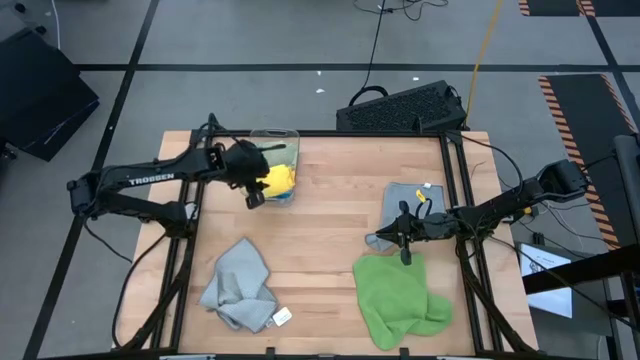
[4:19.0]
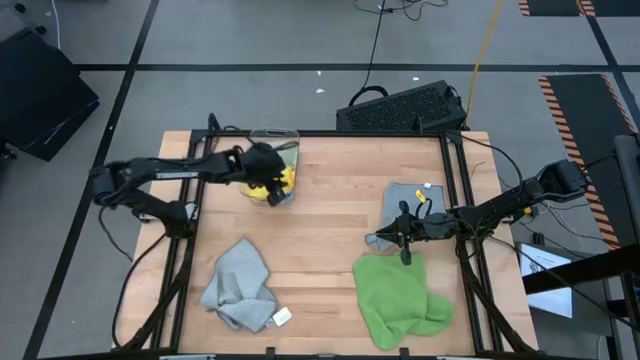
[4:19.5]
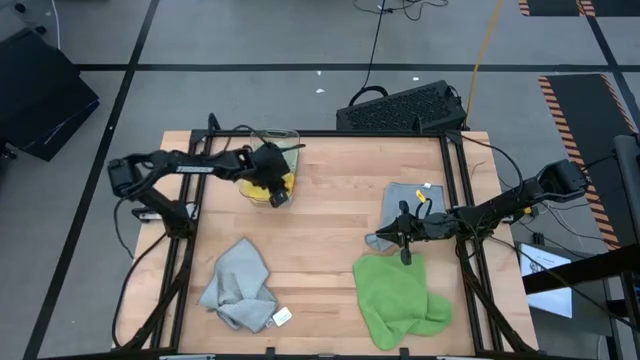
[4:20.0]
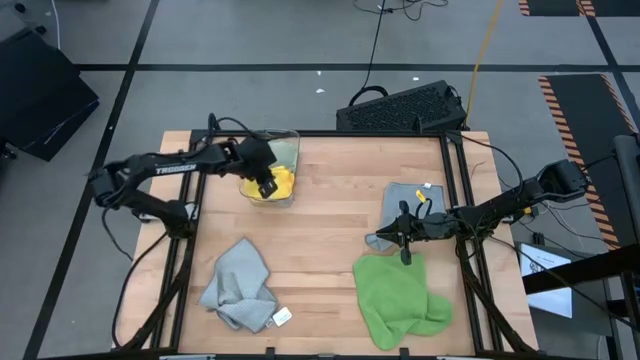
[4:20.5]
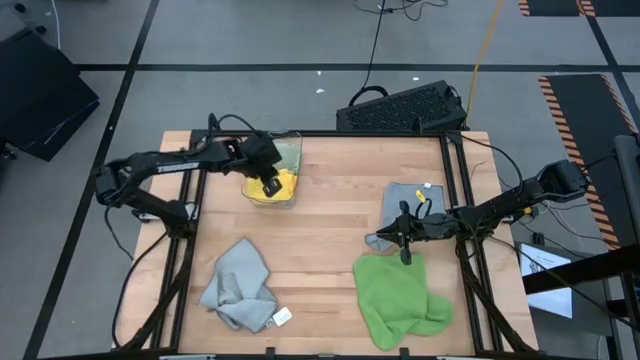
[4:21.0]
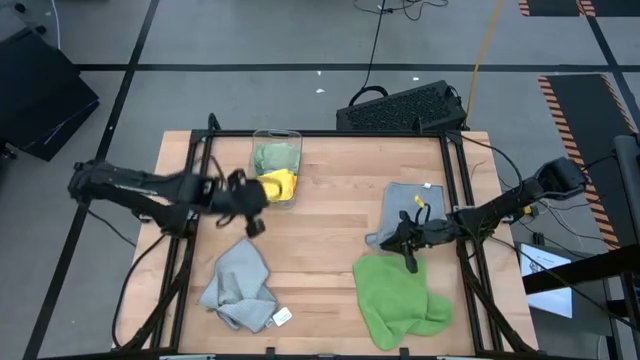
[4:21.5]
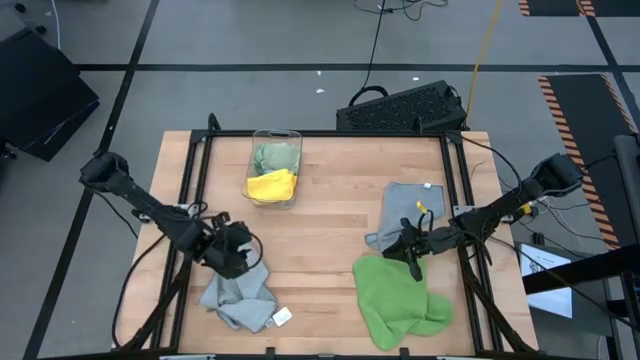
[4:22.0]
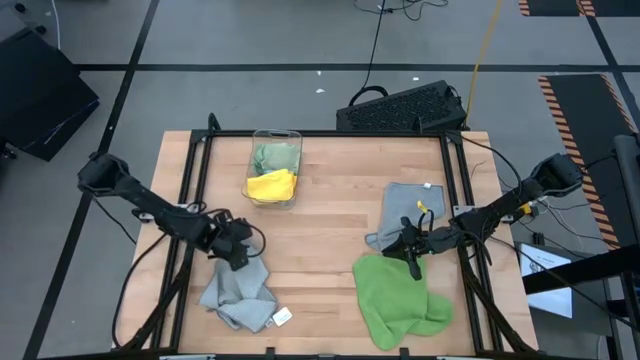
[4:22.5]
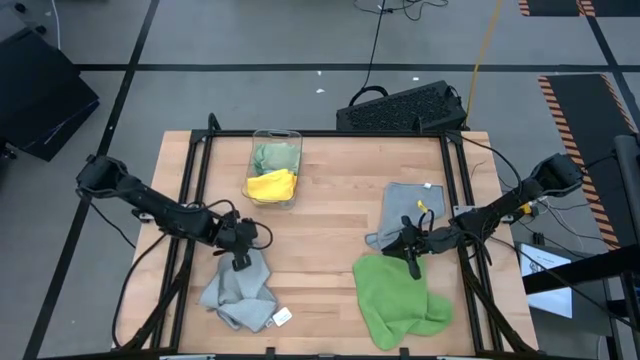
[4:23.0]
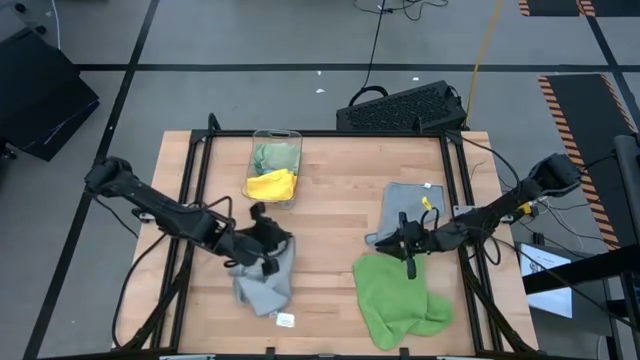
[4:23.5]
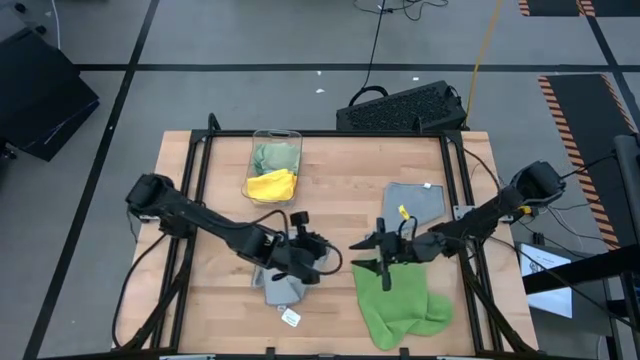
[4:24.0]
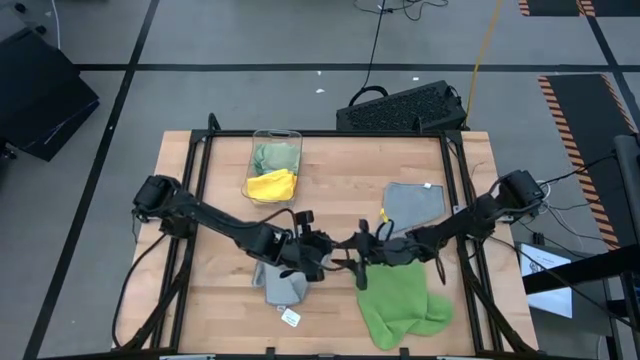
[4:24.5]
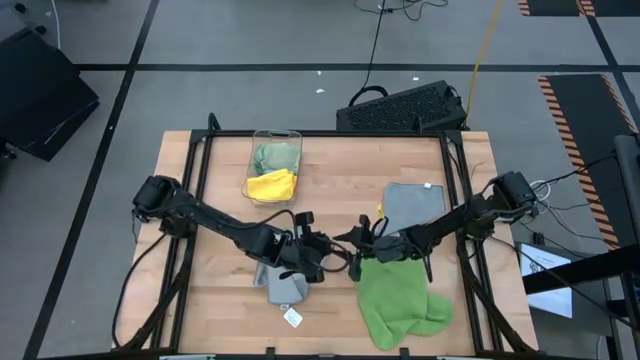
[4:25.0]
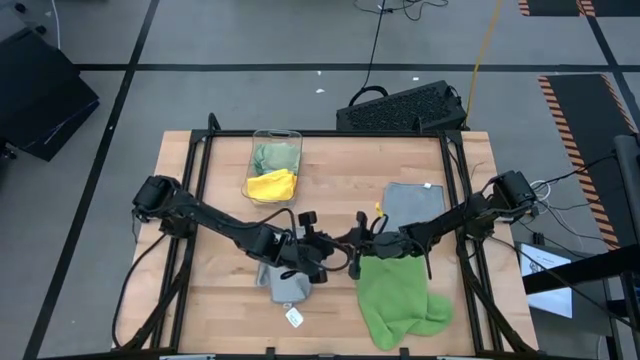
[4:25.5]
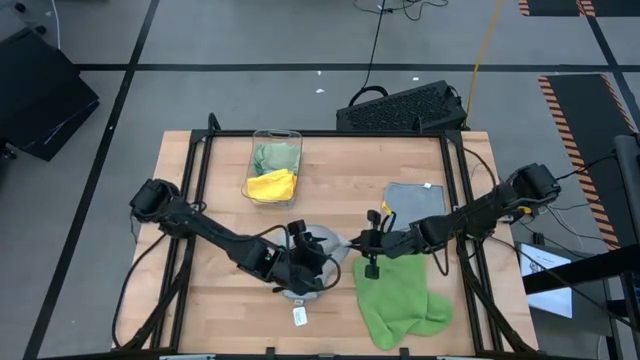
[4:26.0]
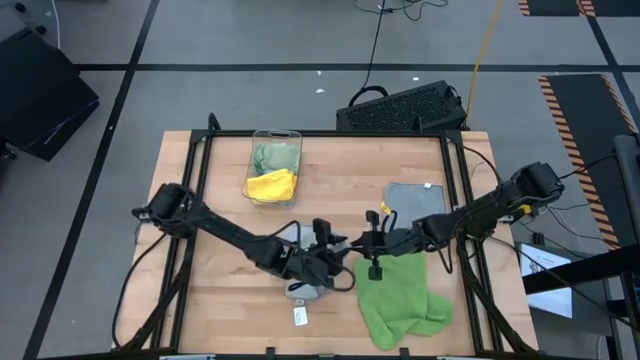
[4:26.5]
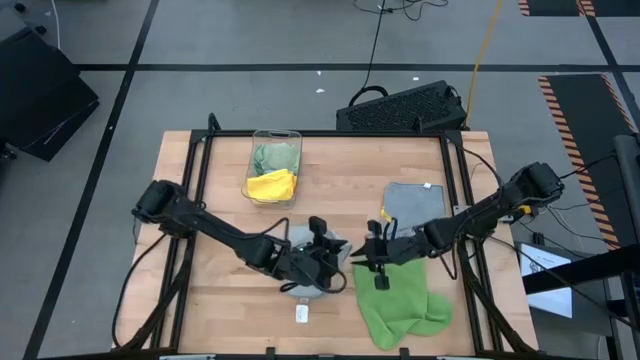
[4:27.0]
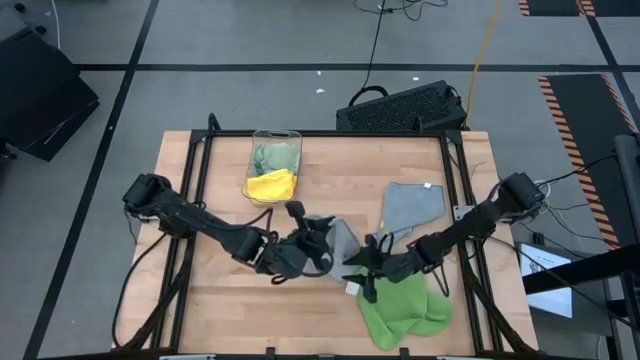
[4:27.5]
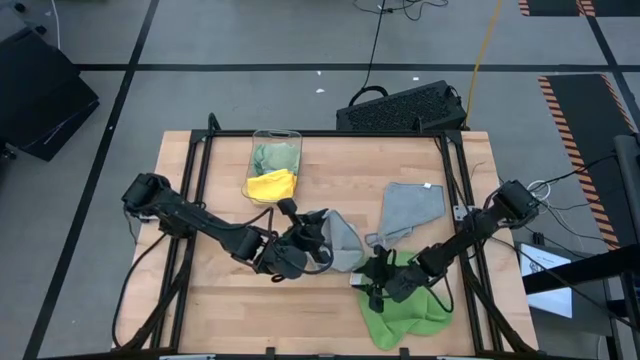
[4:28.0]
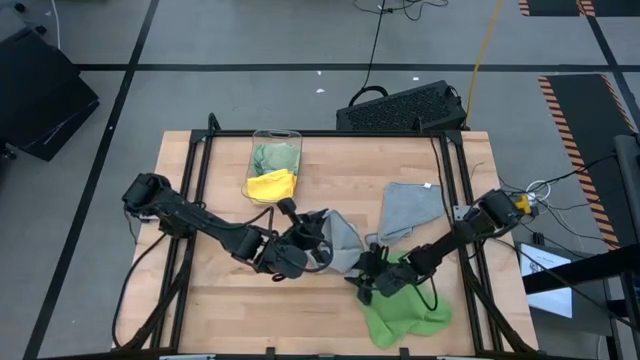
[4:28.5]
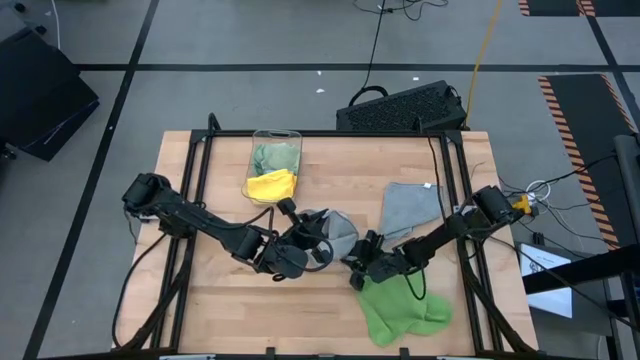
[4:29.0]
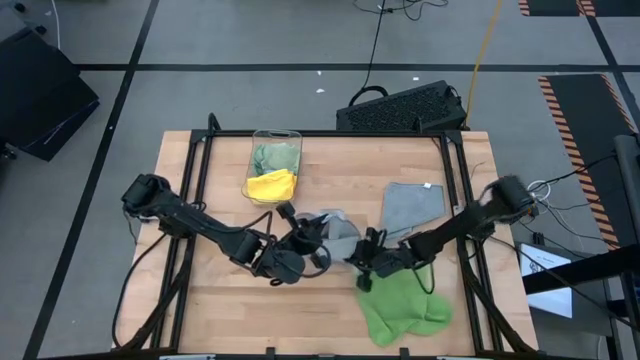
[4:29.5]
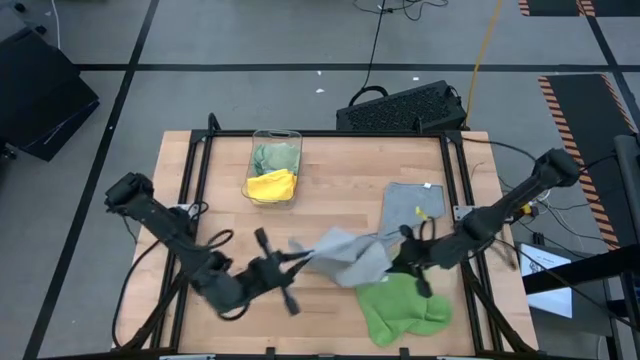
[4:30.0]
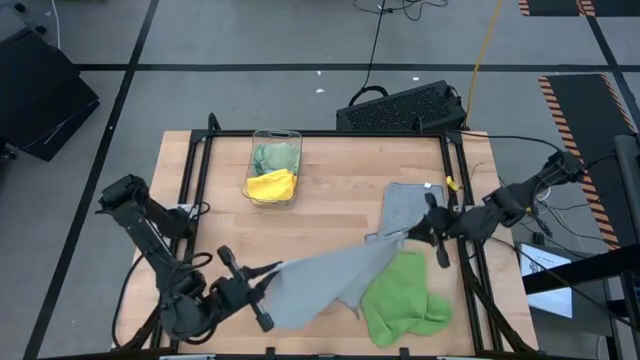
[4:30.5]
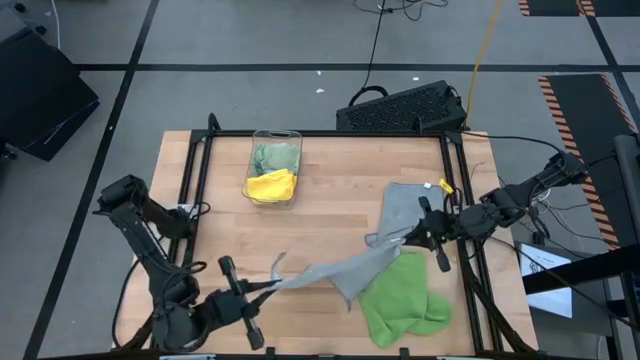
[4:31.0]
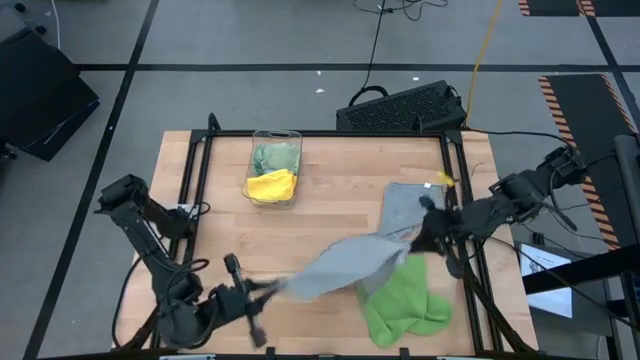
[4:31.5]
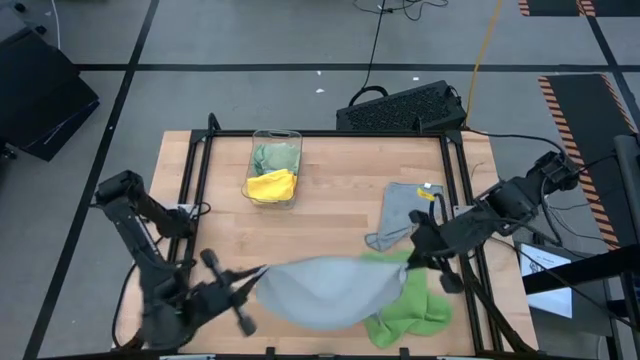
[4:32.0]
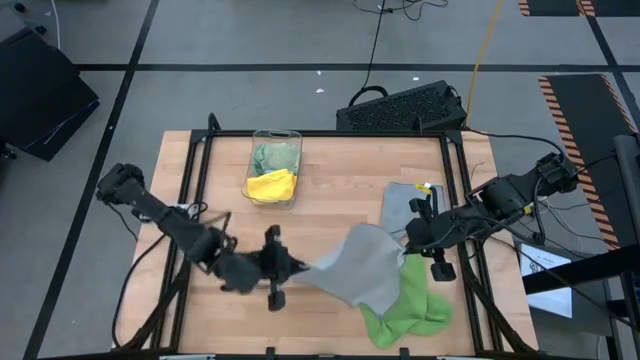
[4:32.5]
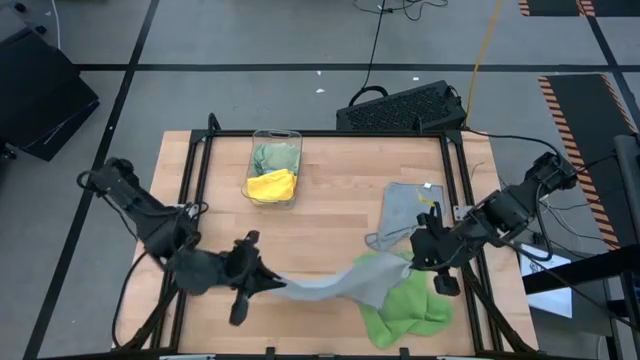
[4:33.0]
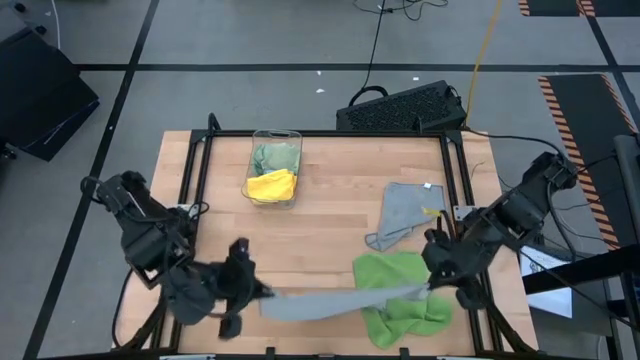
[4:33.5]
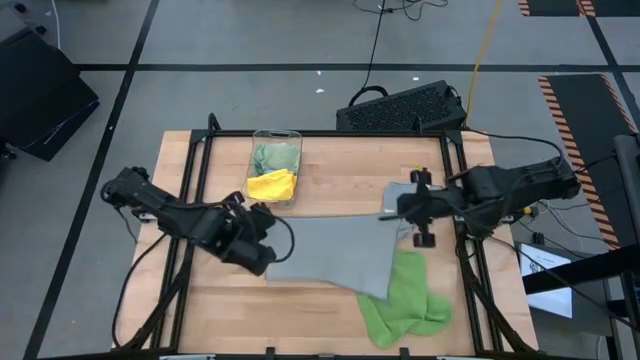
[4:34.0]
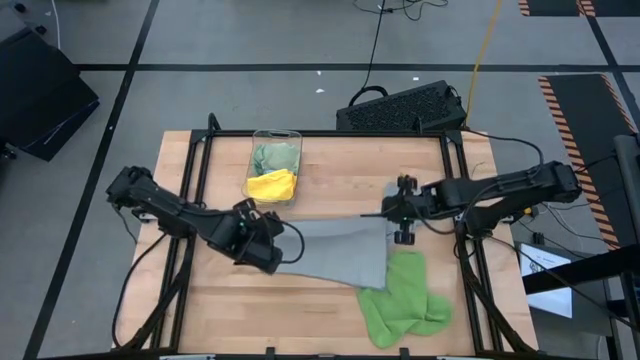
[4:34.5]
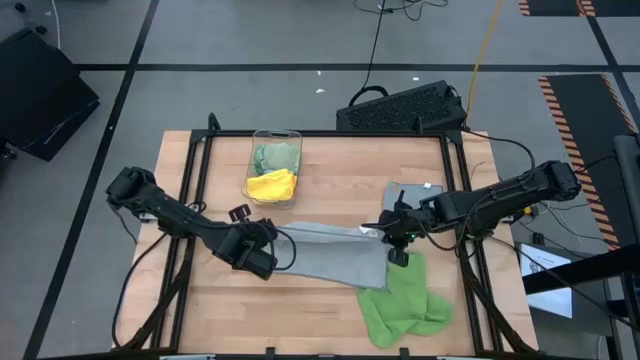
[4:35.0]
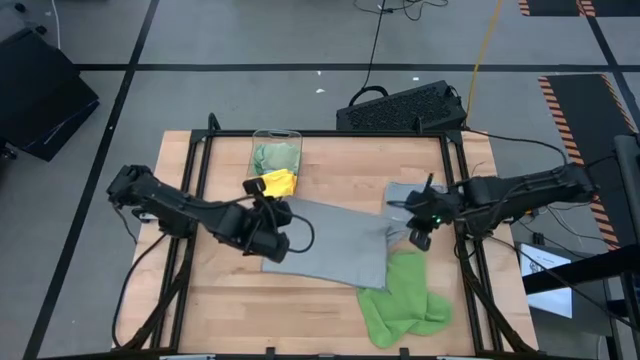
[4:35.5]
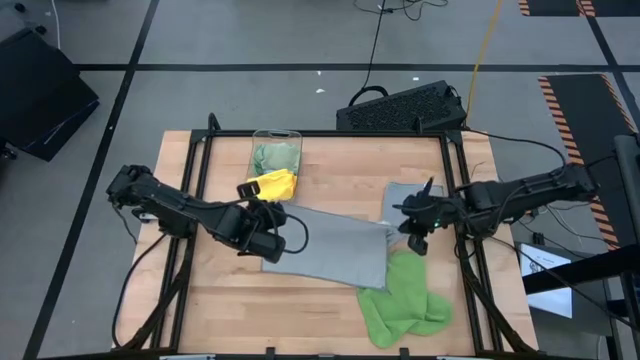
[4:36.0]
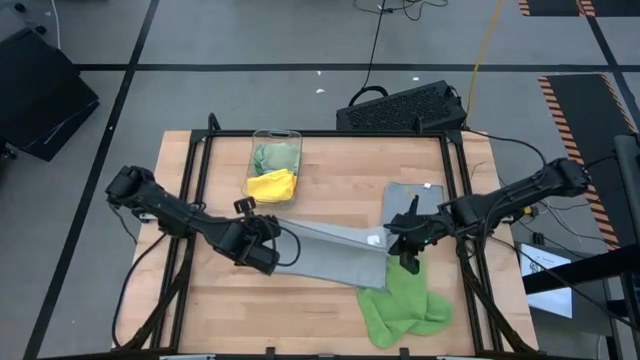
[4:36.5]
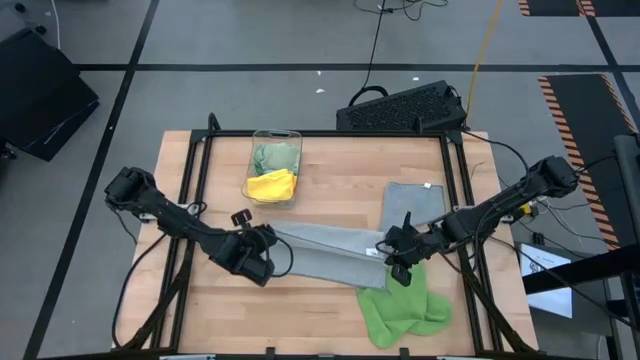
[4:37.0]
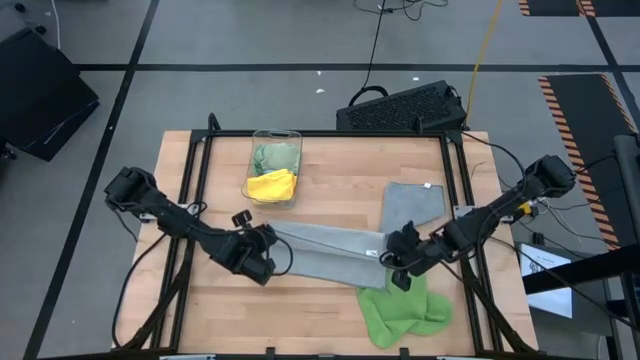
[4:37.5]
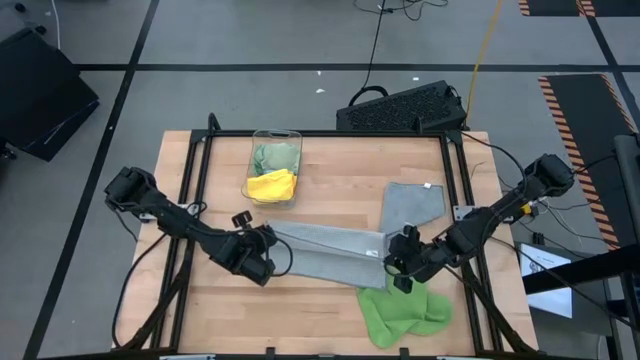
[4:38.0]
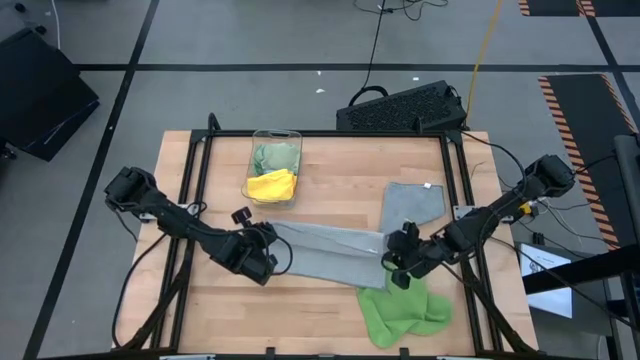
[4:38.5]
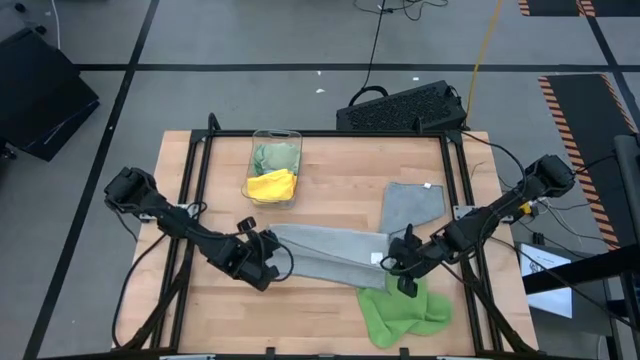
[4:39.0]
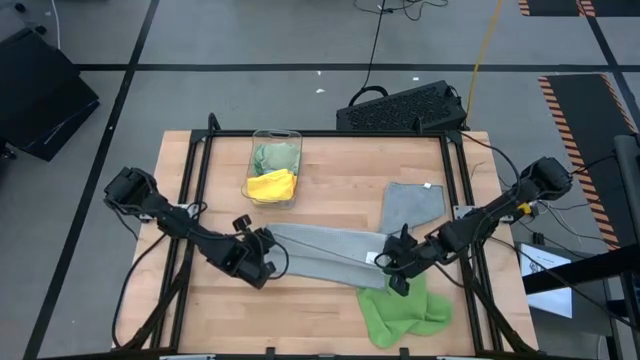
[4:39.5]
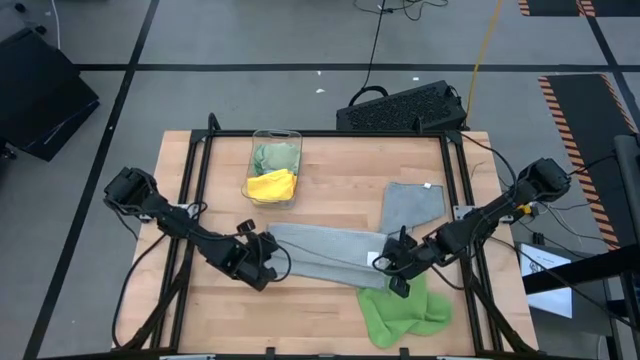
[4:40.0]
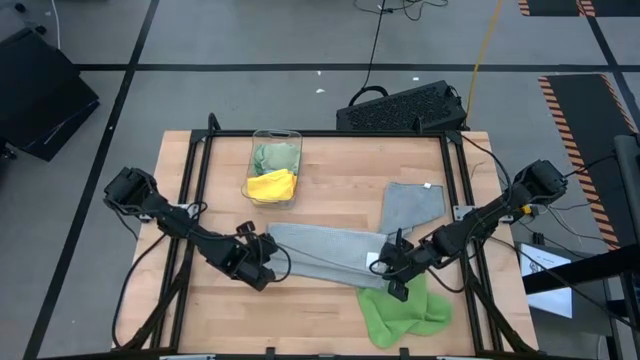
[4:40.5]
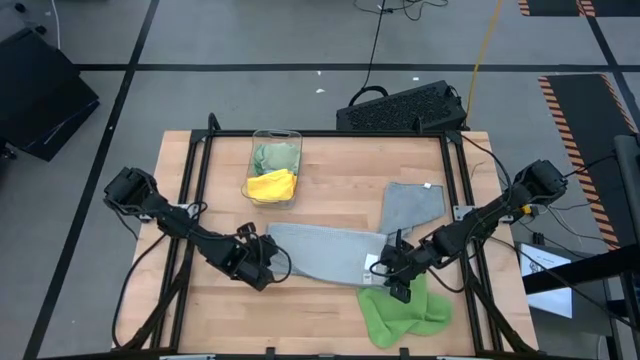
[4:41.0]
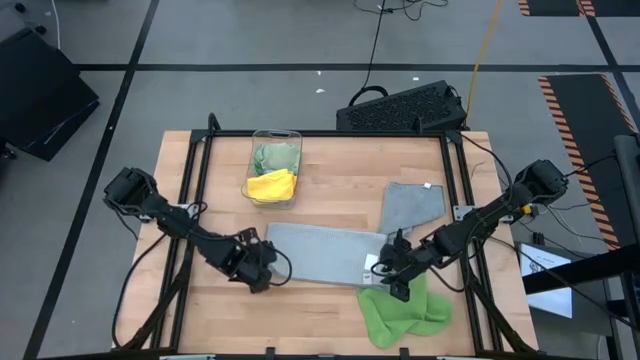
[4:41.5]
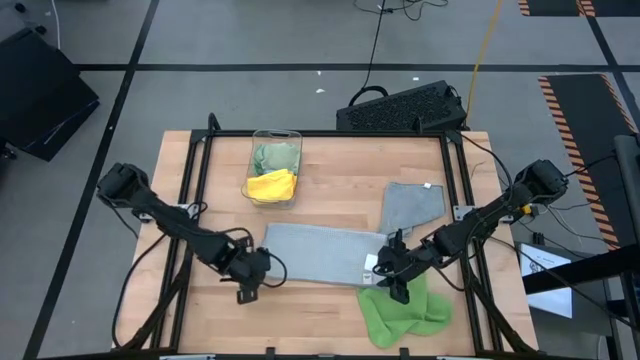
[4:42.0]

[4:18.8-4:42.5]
Task: Fold microfiber towels
Fold the left gray microfiber cloth on the table
